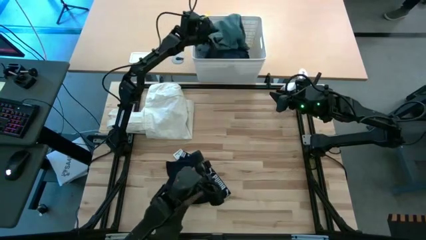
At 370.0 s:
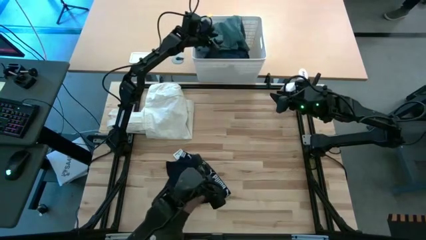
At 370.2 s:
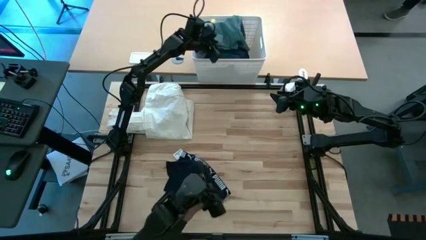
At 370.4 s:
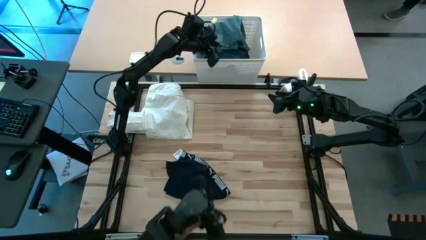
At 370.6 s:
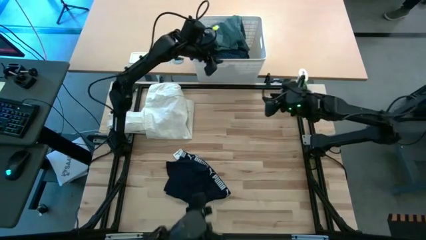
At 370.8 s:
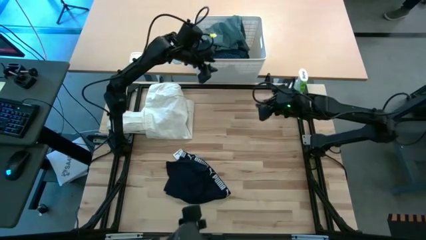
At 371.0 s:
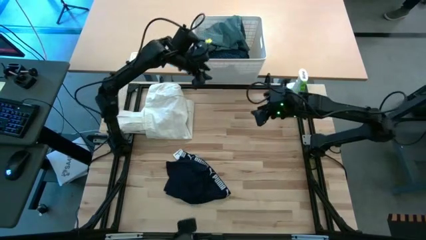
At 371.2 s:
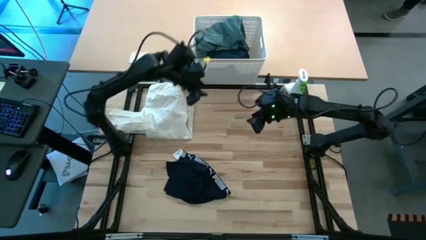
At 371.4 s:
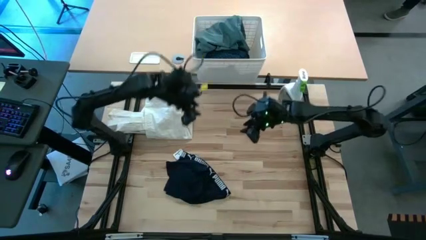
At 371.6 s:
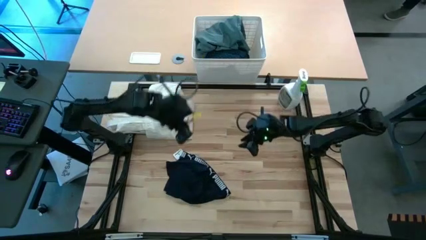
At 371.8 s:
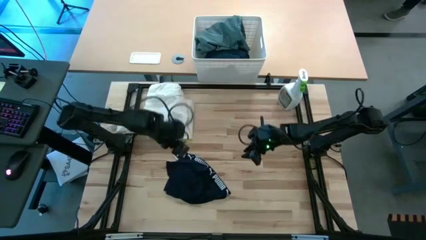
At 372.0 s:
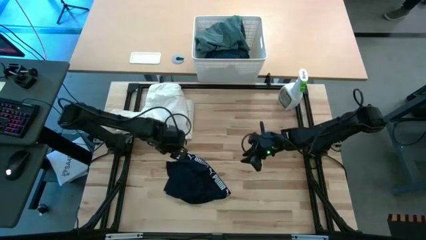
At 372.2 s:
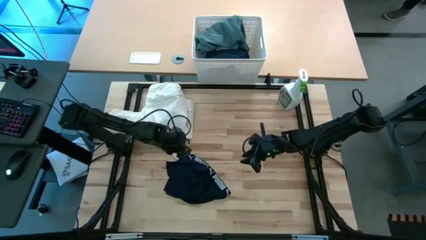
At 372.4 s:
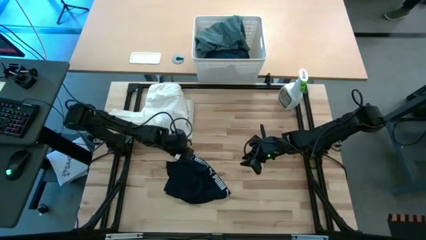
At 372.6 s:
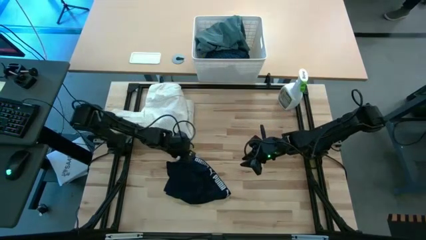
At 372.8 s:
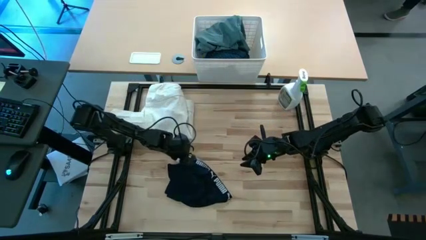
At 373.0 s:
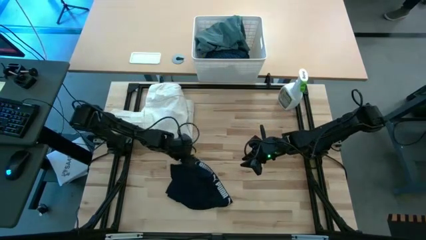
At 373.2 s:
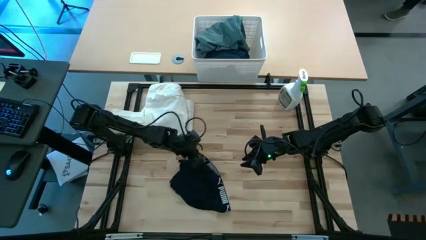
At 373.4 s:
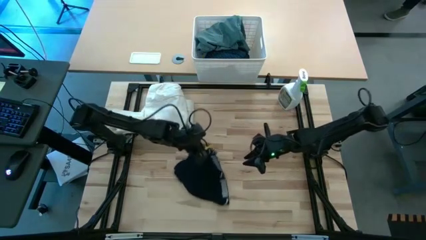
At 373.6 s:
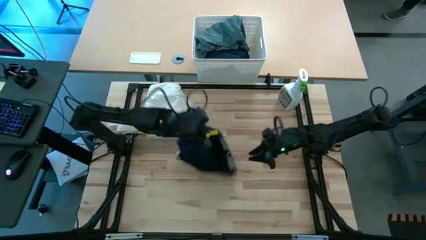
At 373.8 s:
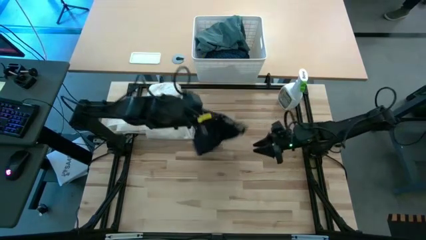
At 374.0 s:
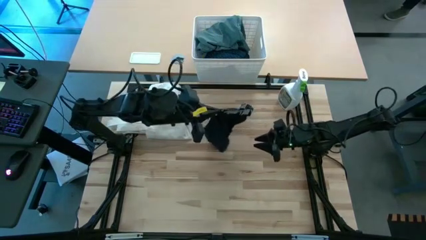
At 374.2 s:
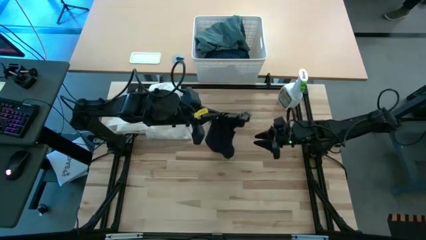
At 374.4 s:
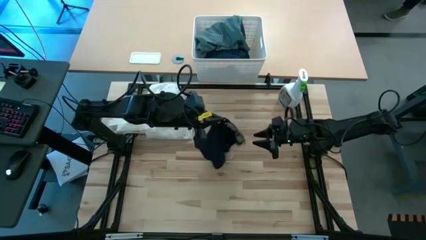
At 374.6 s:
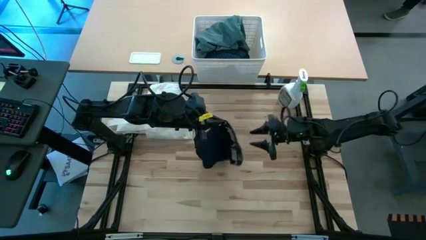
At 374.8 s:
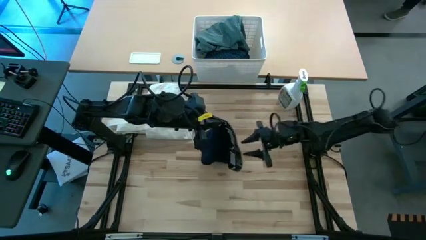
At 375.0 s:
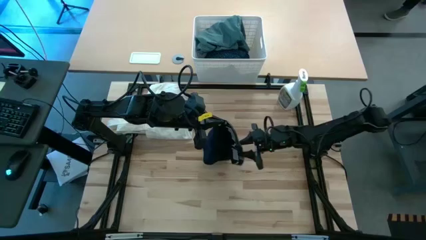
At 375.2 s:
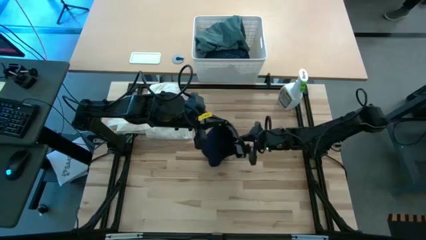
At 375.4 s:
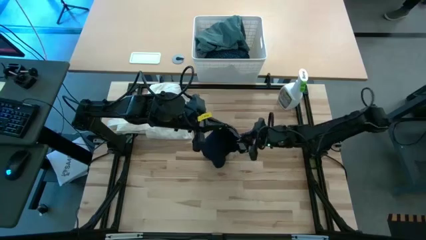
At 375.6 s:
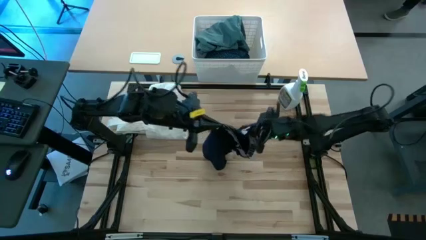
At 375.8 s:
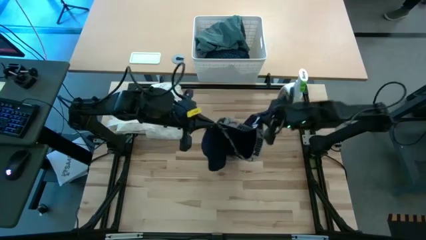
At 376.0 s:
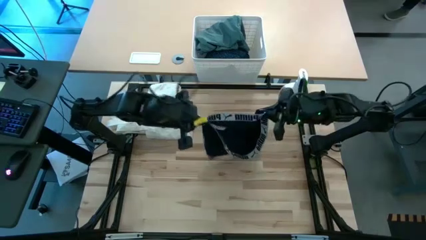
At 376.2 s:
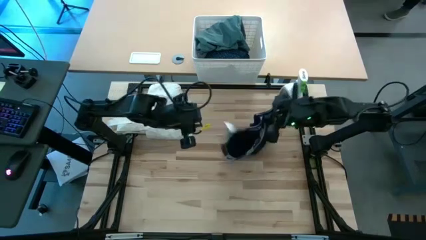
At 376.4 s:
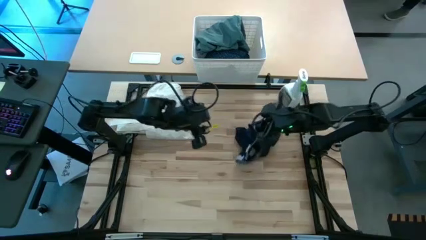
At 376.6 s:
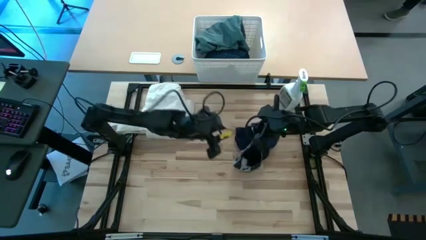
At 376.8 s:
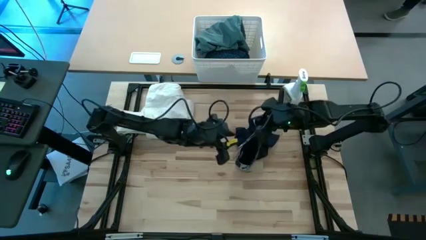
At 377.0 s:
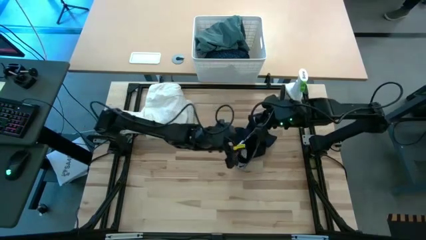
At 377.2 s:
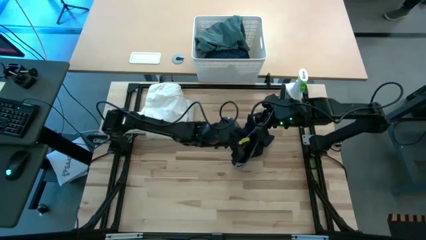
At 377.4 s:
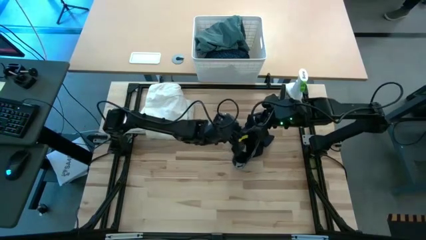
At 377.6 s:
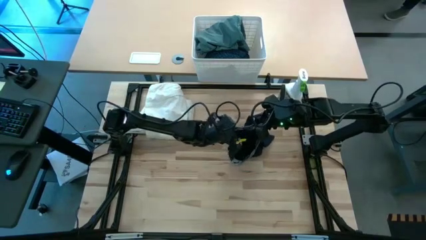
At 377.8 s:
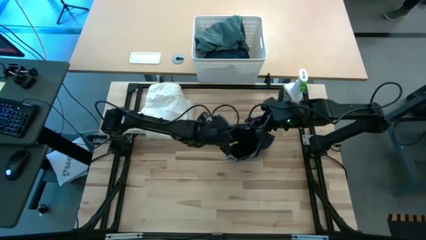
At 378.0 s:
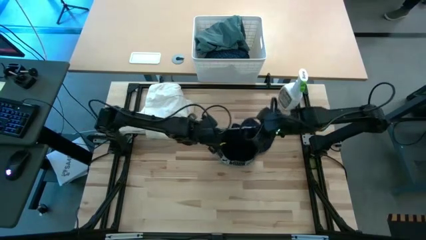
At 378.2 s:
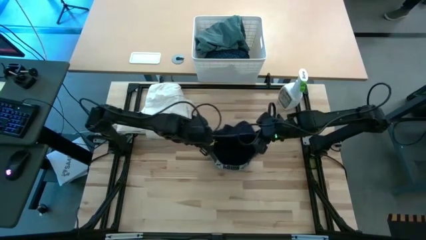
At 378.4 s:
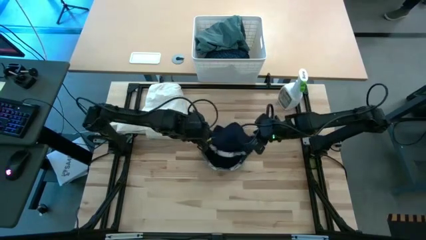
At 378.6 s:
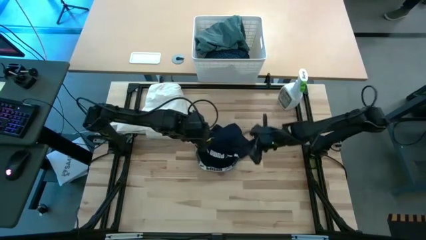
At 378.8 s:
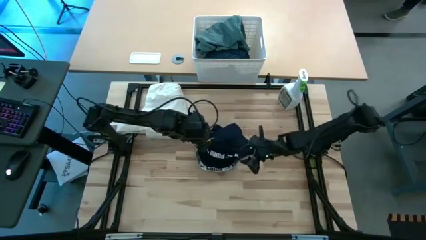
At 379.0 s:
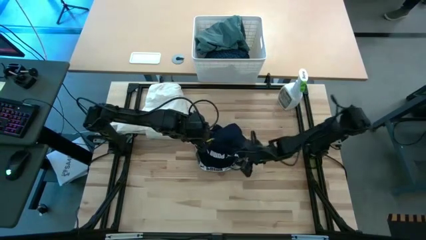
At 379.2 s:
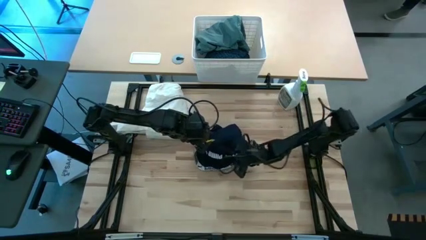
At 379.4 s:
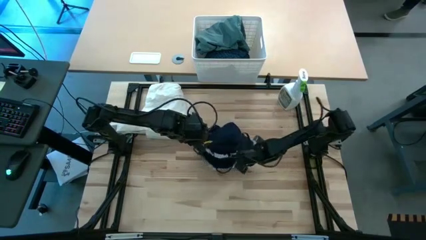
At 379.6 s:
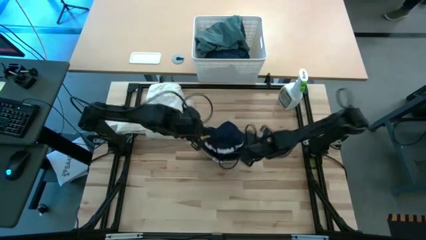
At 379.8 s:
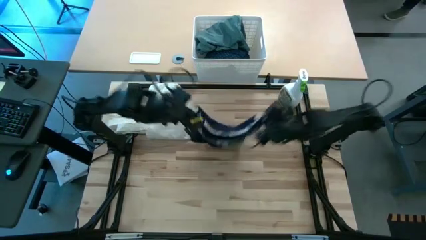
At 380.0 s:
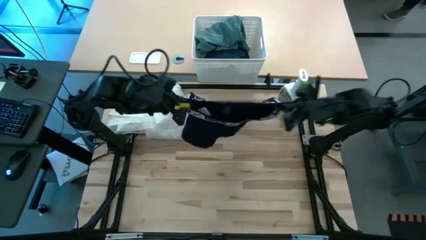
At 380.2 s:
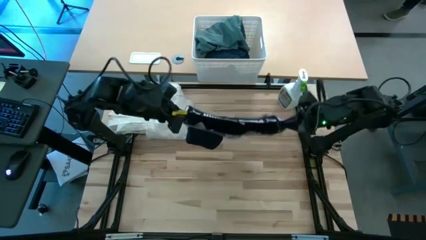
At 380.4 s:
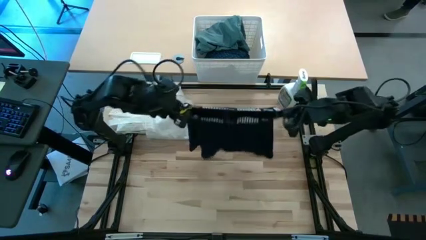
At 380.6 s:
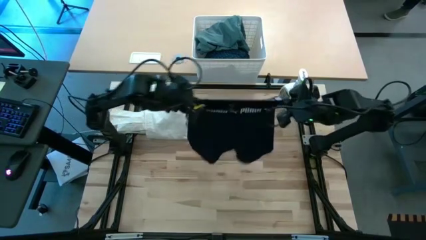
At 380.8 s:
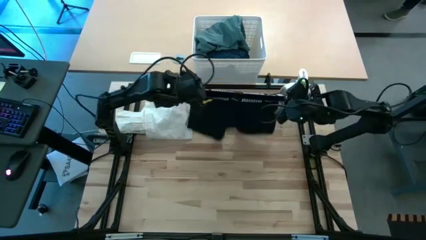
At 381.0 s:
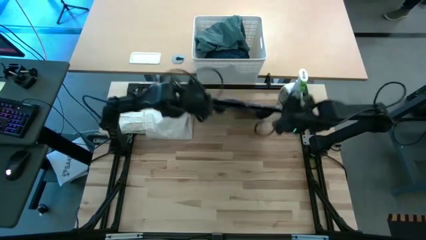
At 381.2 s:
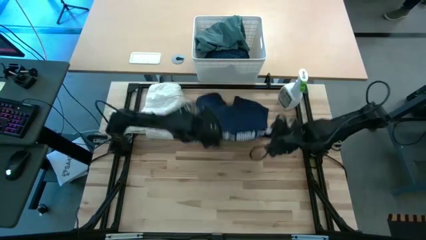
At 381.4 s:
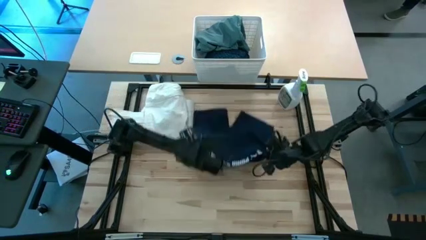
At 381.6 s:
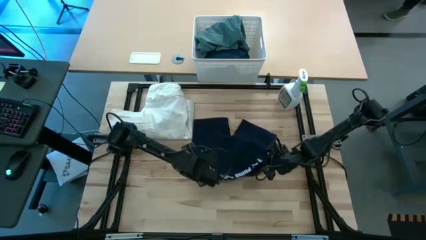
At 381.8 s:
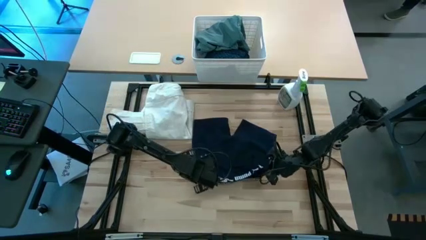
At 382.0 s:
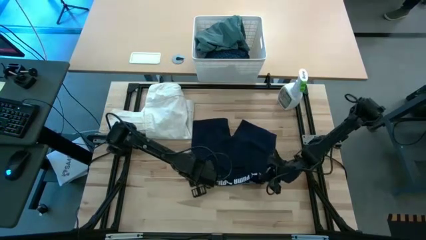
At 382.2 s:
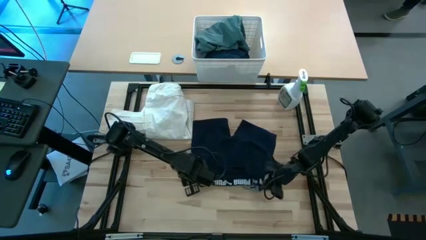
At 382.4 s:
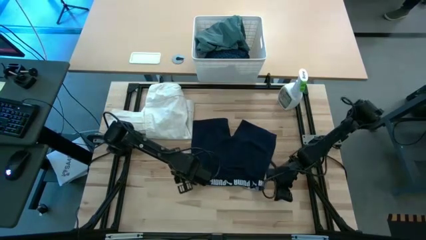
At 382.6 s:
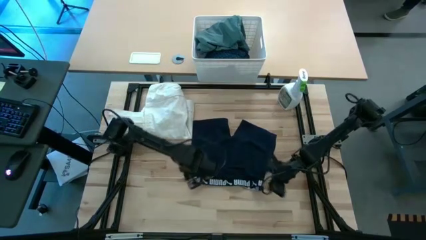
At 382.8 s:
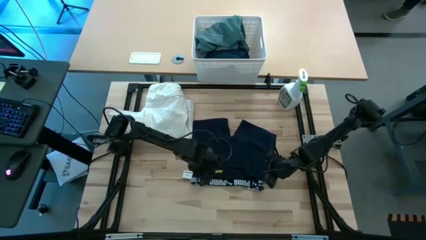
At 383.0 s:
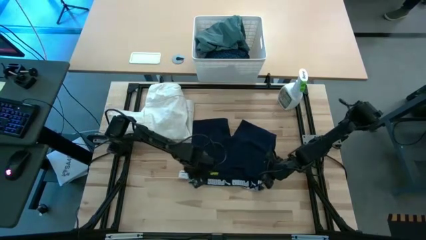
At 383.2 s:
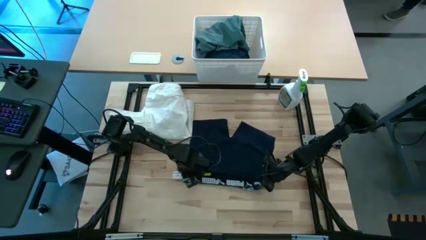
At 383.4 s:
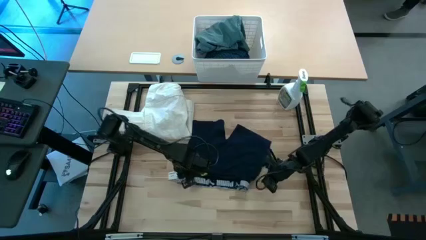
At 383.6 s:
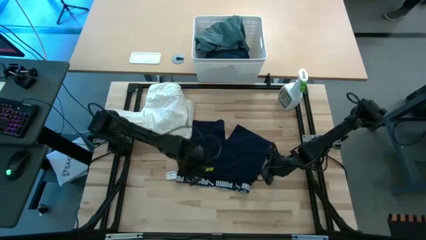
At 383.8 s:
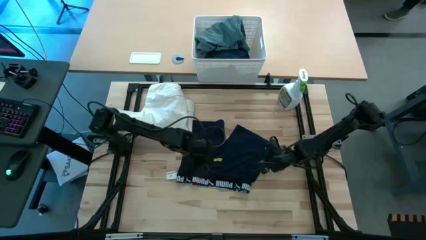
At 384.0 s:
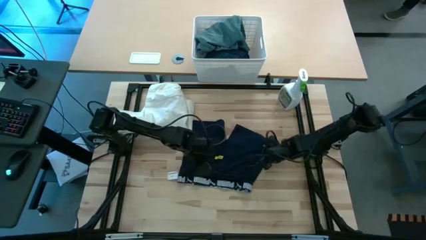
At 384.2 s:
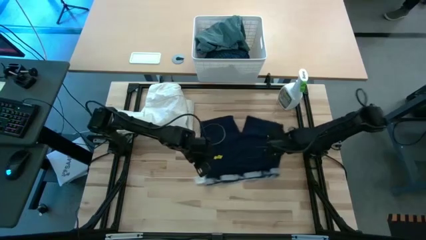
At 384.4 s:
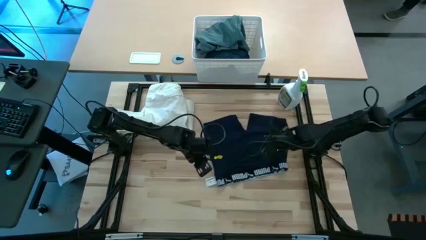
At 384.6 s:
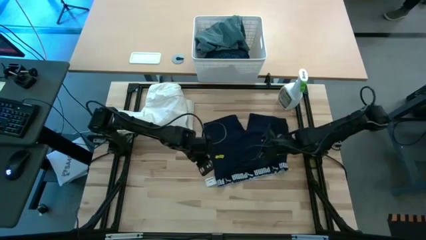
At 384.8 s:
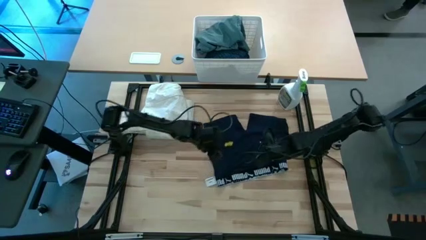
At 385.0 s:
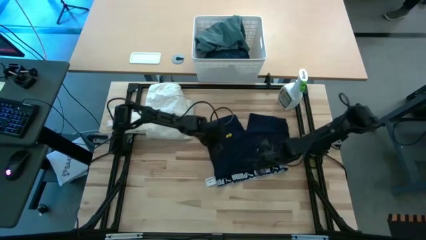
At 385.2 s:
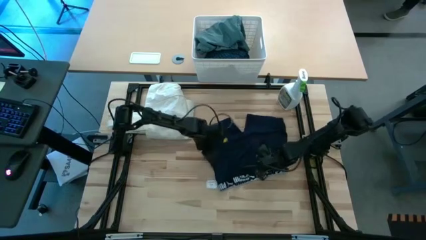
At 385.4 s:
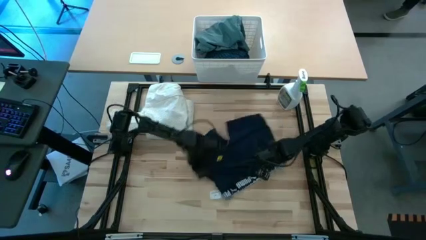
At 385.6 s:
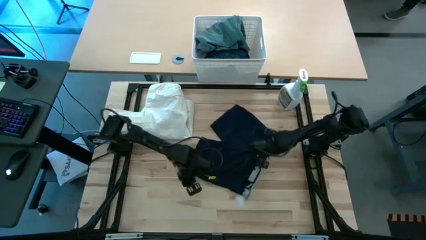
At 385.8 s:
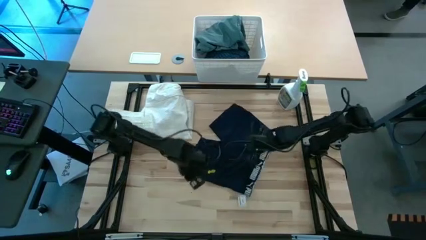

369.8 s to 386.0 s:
Fold the blue boxer short
